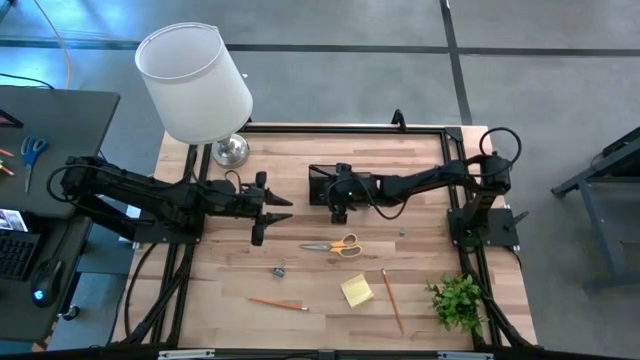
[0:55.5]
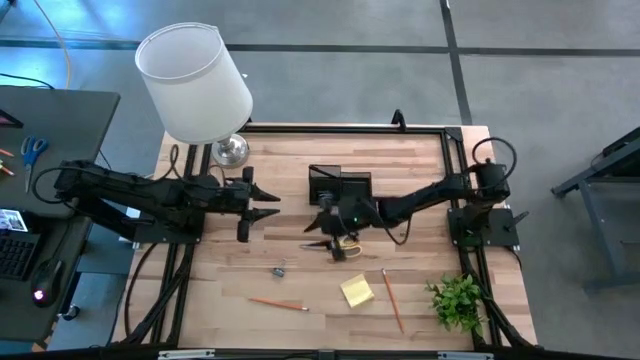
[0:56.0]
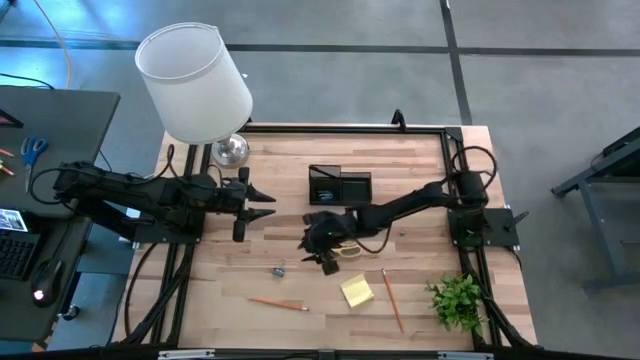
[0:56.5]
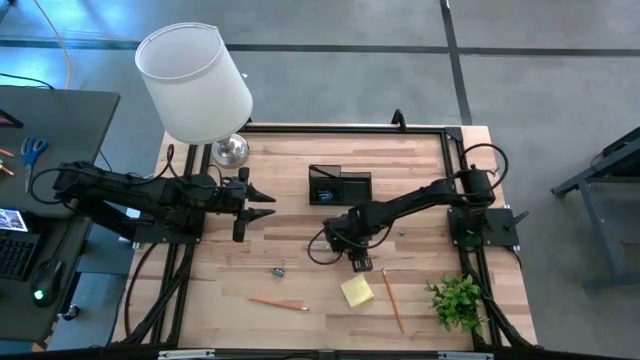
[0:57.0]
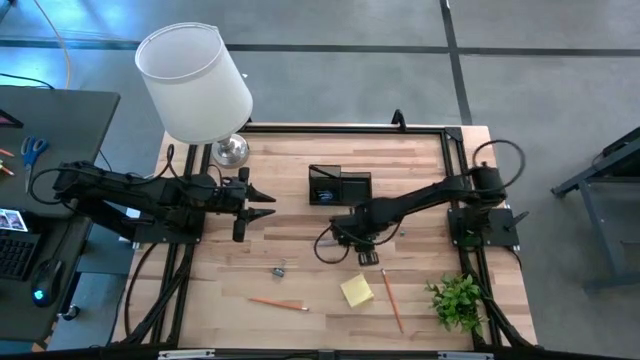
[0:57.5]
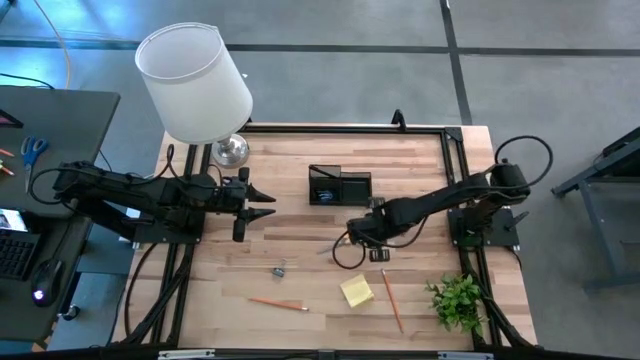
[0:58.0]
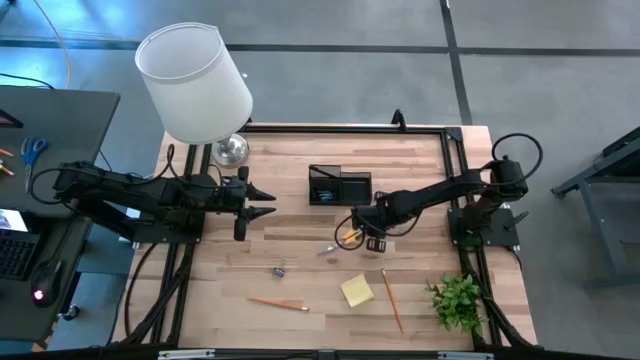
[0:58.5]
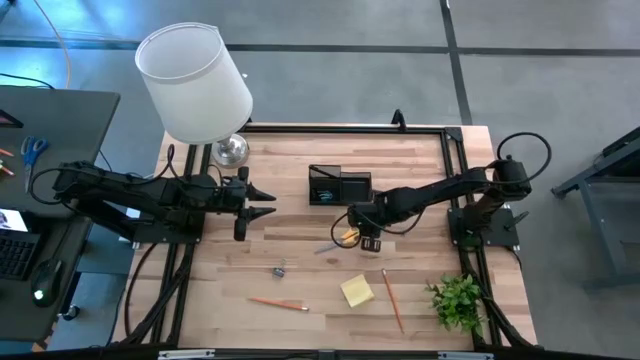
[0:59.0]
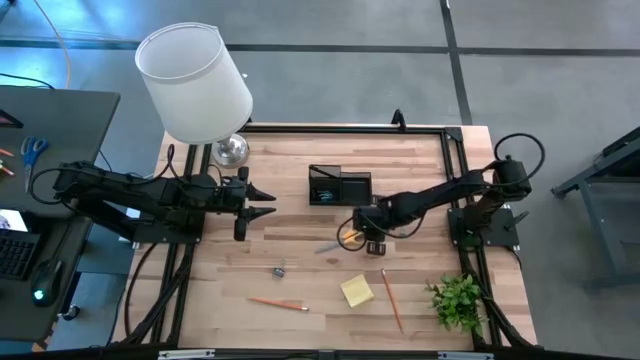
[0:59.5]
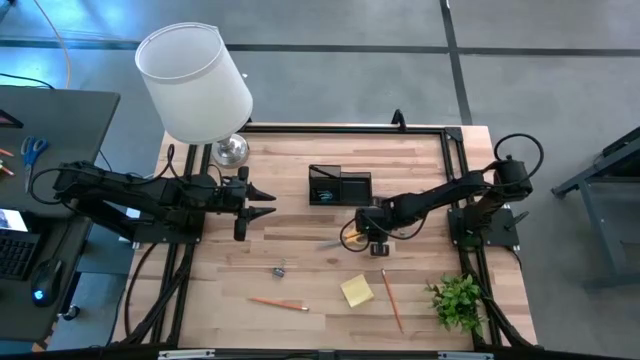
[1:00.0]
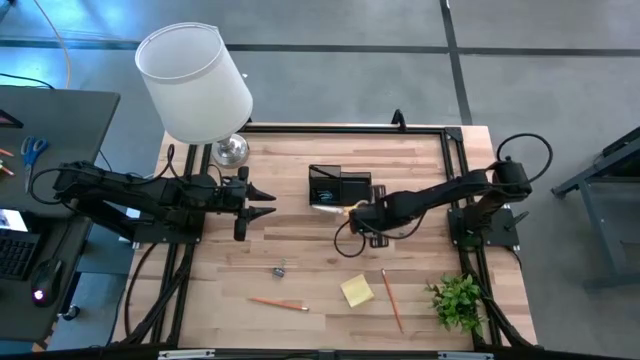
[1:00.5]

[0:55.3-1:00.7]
Task: Pick and place office supplies into organizer
Put the yellow scissors into the black desk organizer

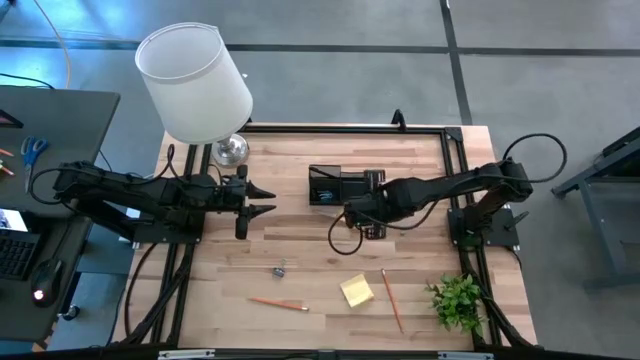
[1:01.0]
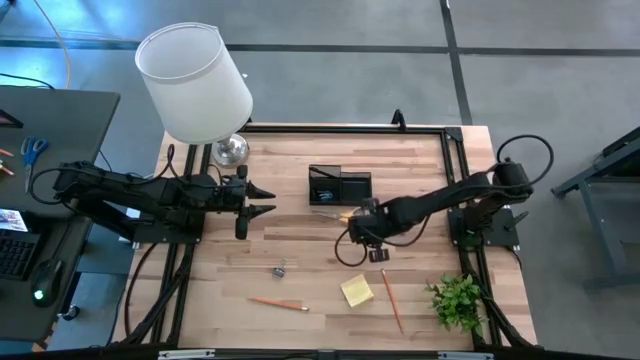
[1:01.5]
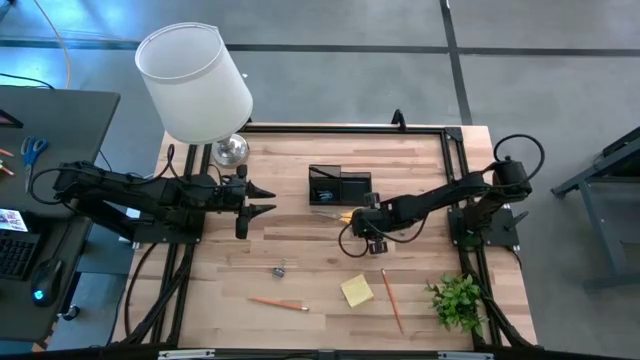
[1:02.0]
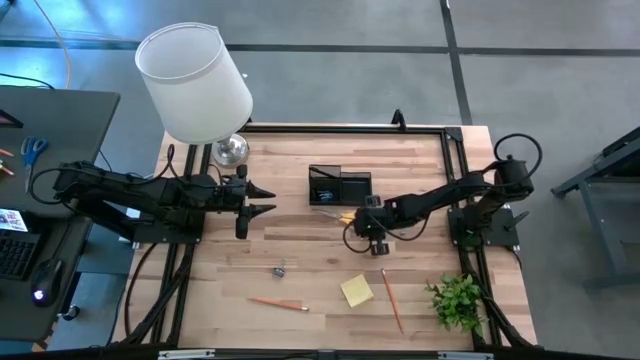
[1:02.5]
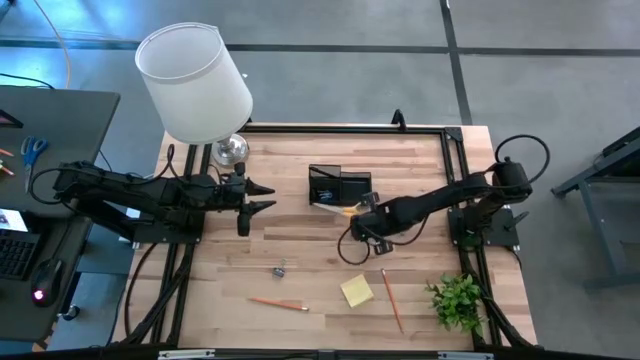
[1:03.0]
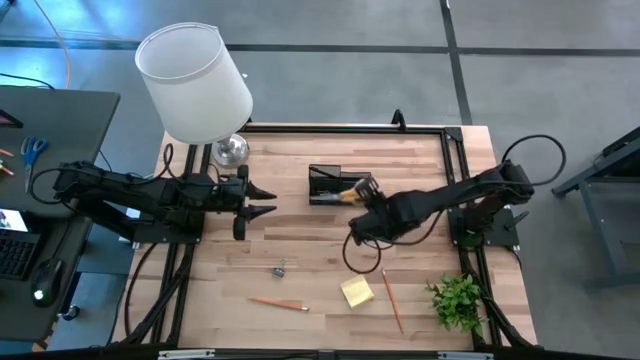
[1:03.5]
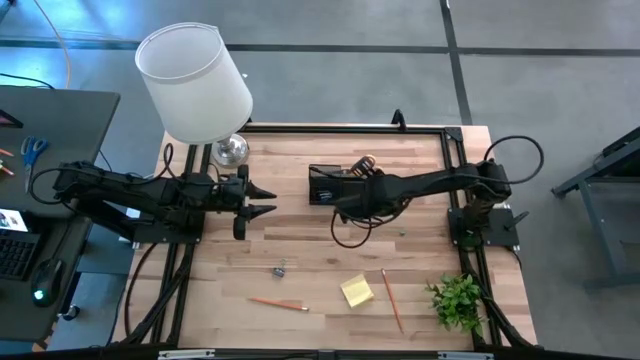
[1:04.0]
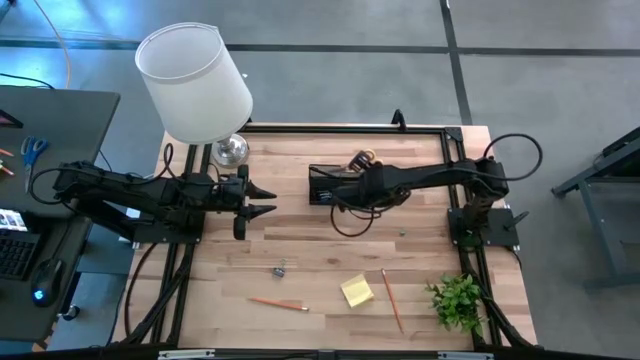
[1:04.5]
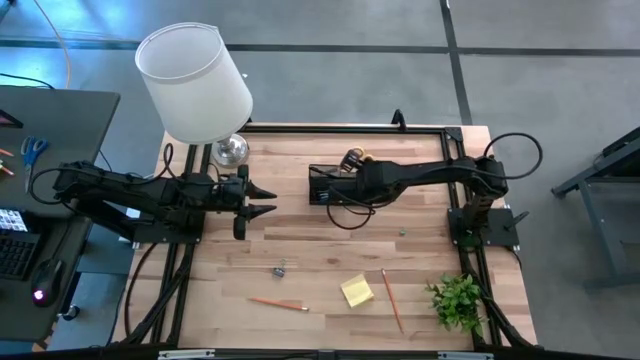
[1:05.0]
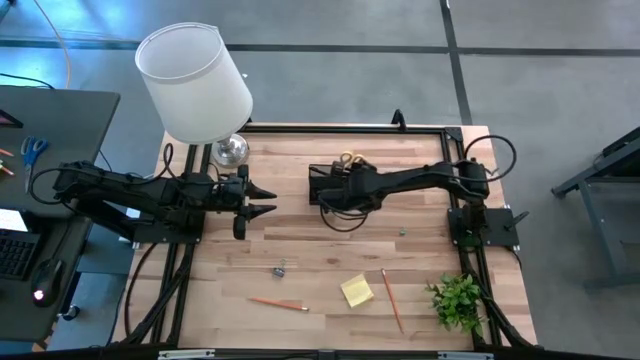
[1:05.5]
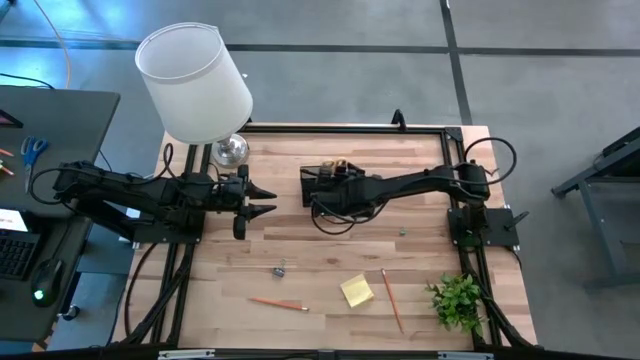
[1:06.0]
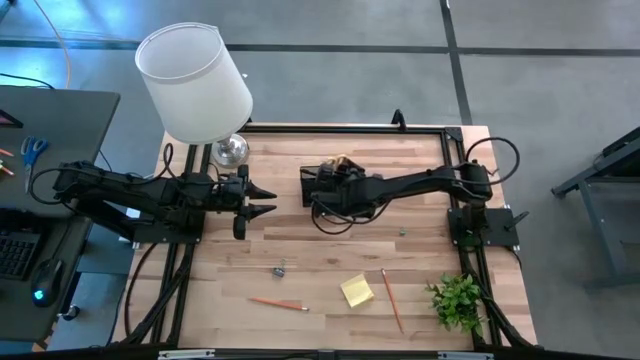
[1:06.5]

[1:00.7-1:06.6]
Put the yellow scissors into the black desk organizer

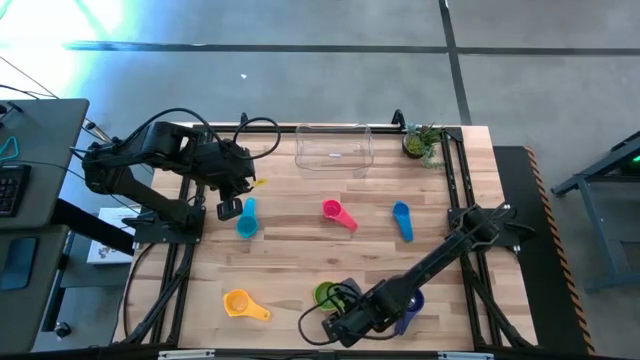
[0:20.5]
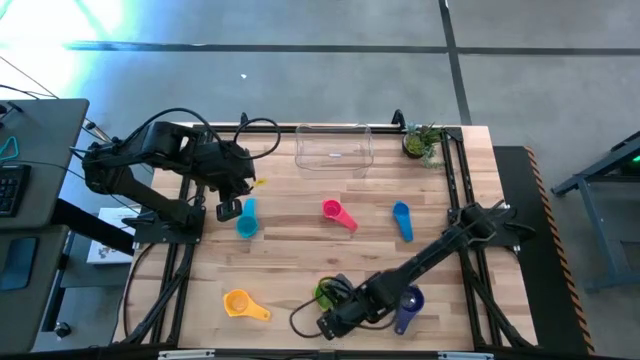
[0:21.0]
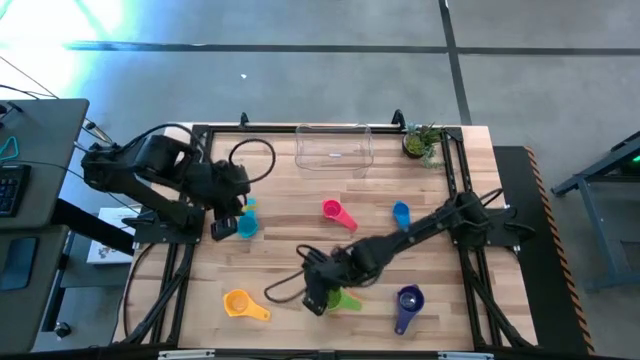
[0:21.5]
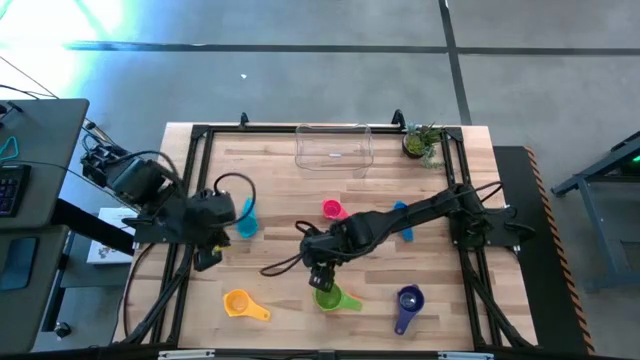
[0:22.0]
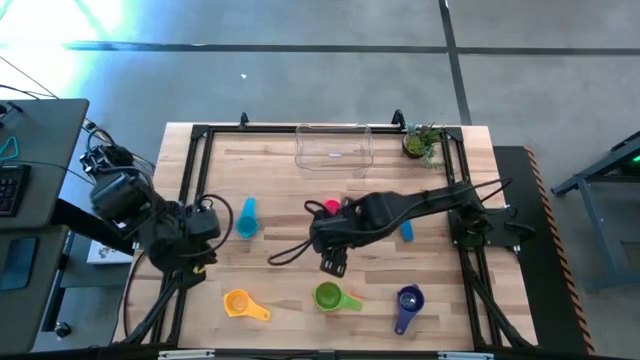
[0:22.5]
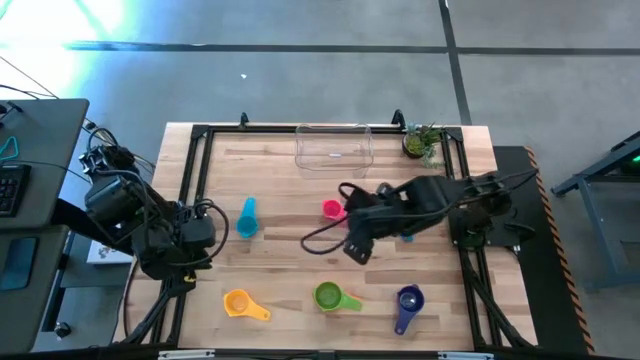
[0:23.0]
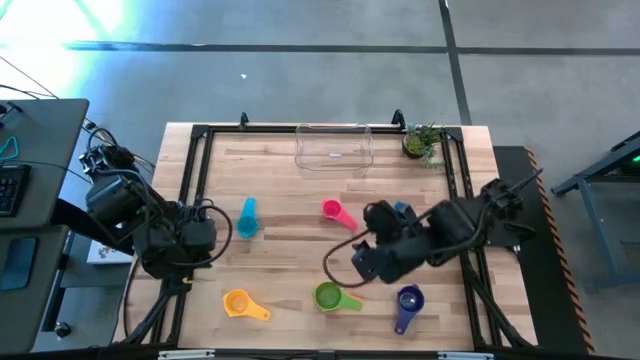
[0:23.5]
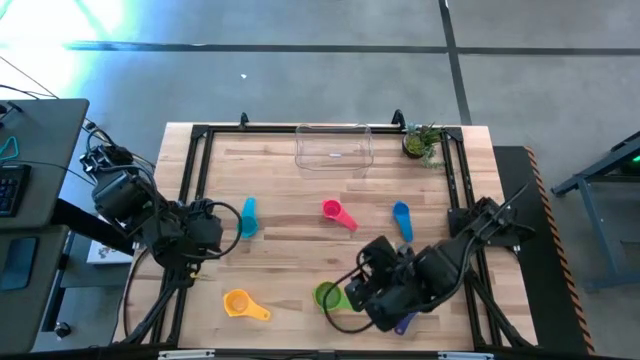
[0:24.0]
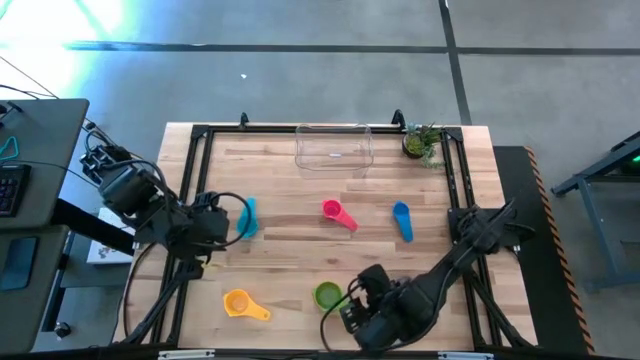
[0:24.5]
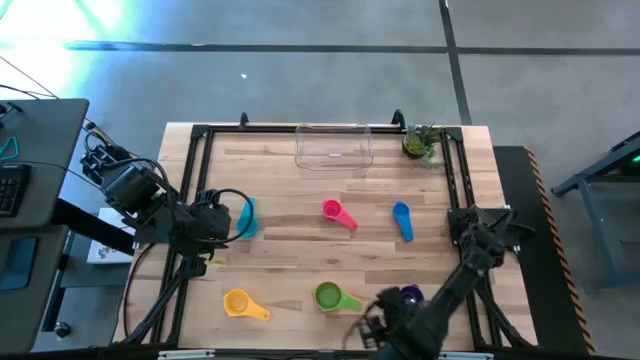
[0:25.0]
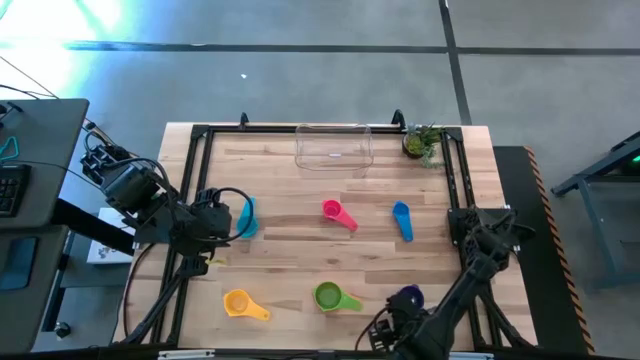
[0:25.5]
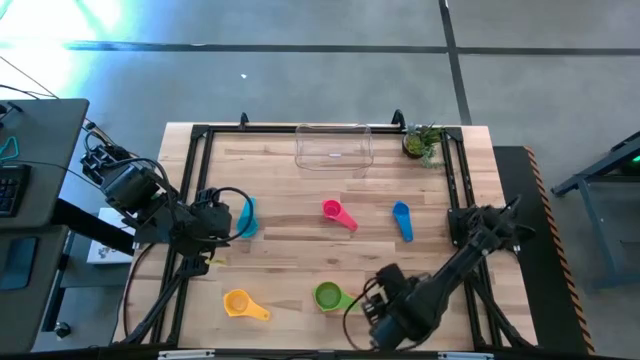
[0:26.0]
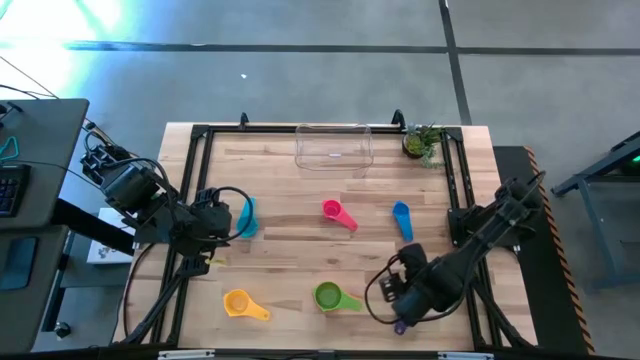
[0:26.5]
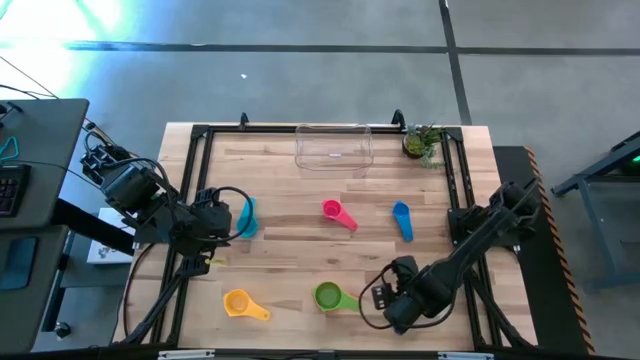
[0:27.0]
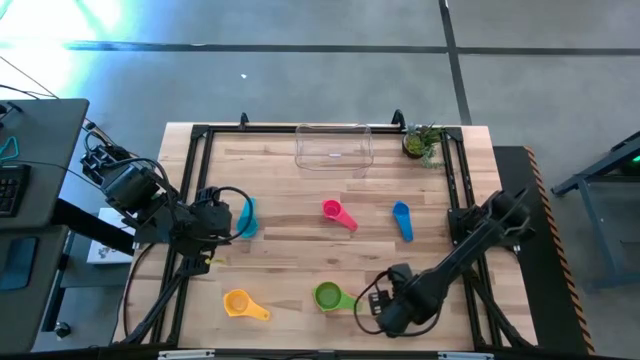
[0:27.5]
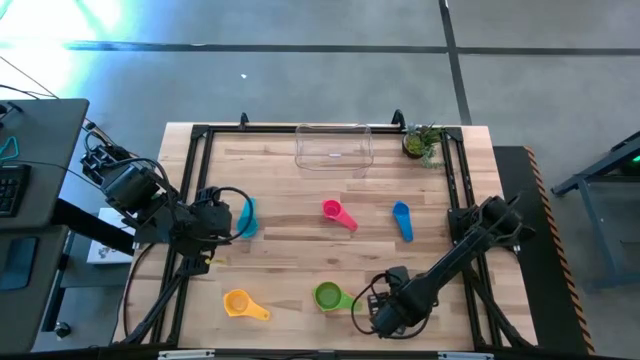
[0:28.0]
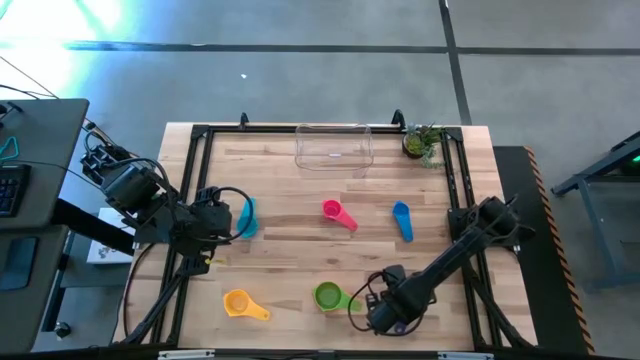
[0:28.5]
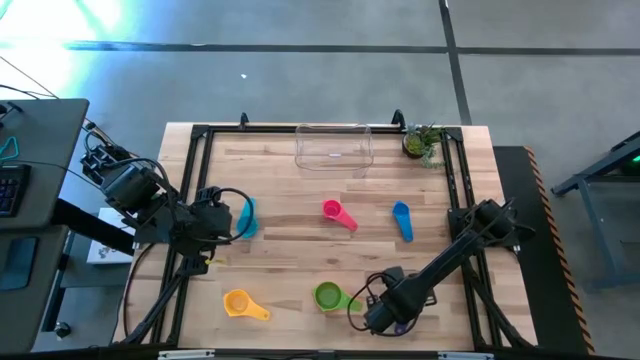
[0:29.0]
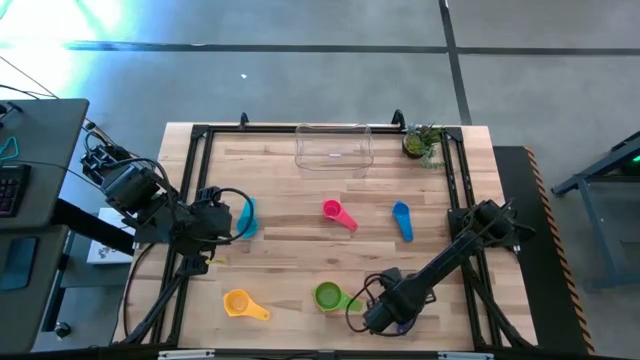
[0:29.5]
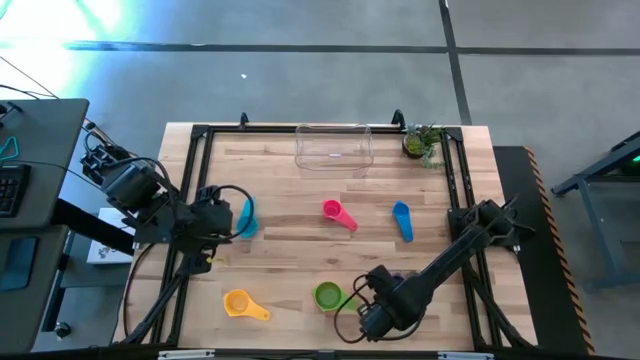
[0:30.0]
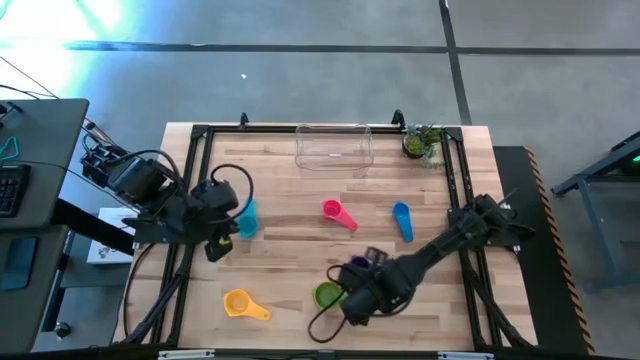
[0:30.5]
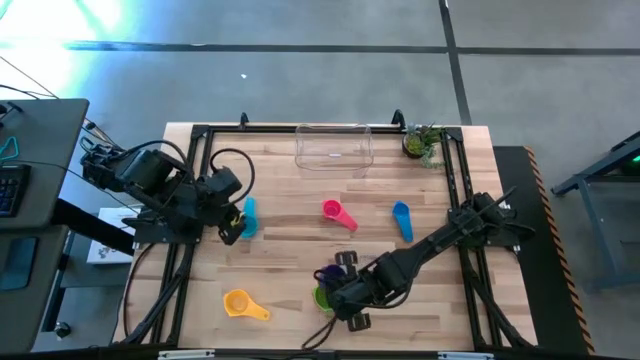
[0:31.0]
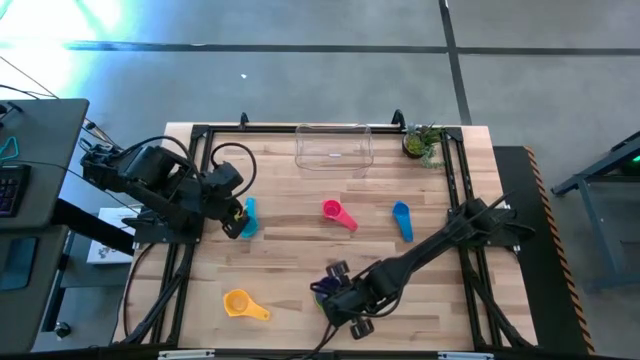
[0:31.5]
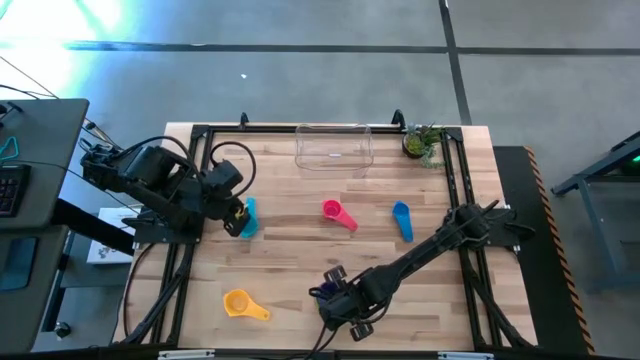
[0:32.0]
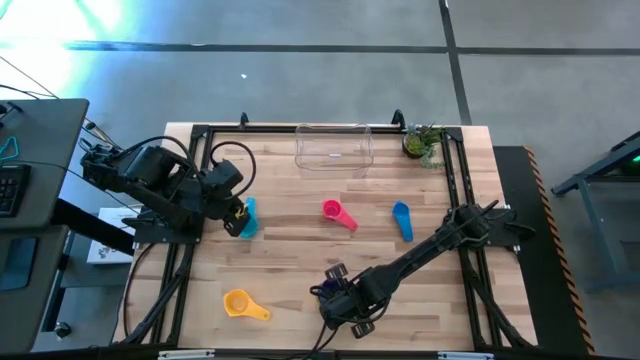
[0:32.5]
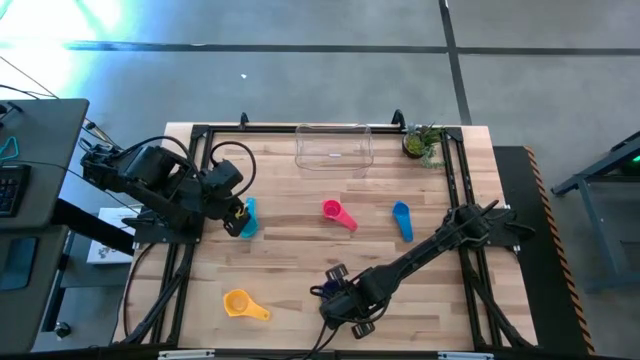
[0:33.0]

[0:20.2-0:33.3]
Task: Nest measuring cups in basket
Stack the dark blue measuring cup on the green measuring cup
